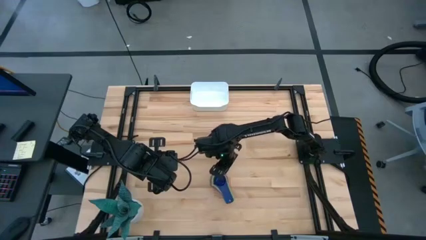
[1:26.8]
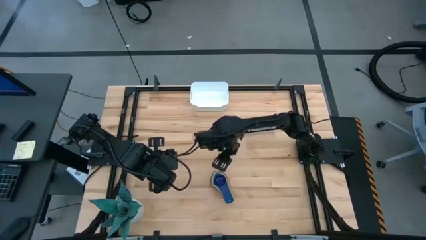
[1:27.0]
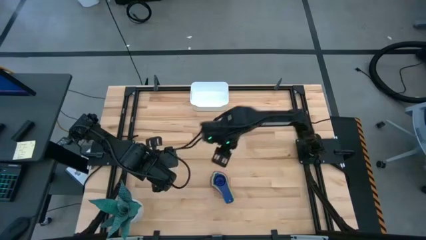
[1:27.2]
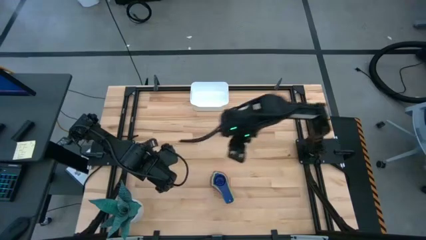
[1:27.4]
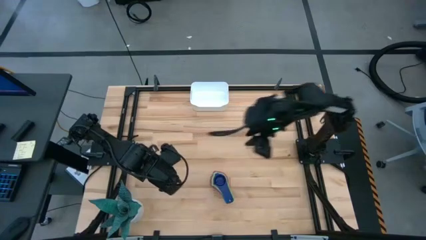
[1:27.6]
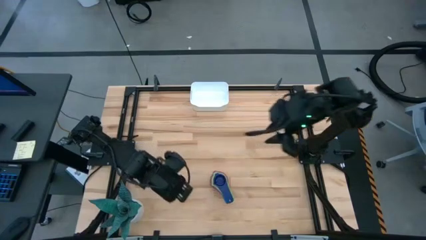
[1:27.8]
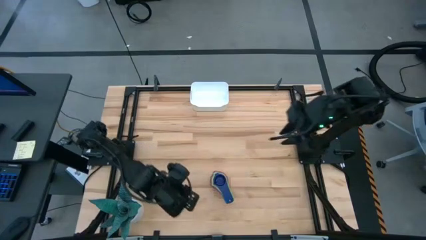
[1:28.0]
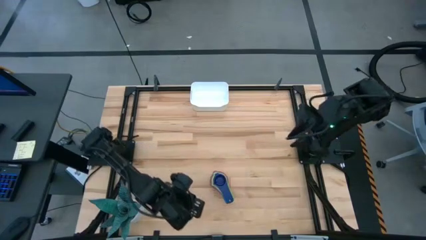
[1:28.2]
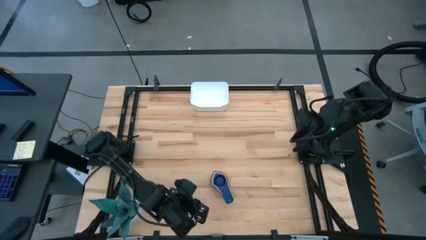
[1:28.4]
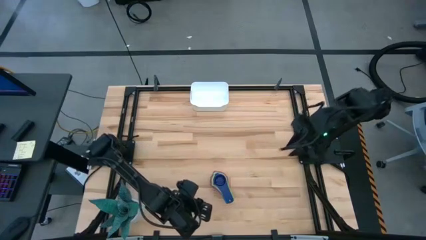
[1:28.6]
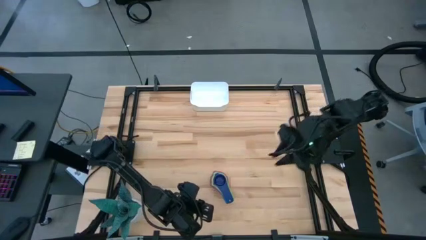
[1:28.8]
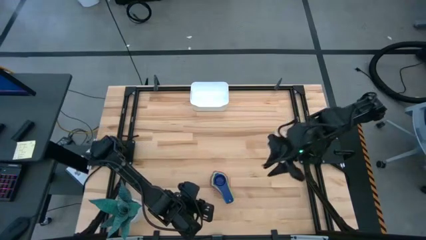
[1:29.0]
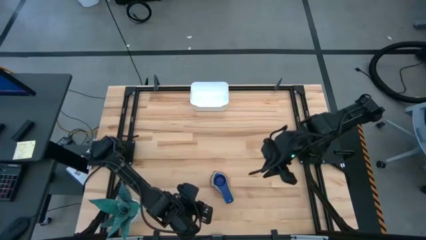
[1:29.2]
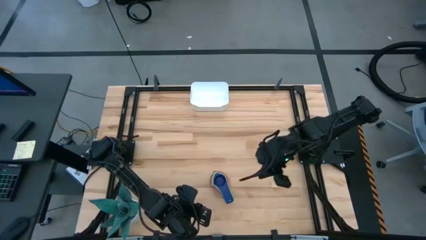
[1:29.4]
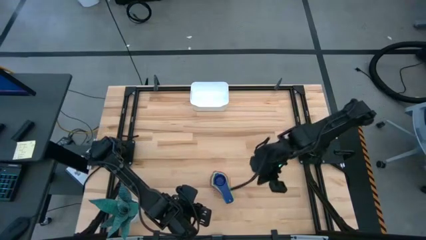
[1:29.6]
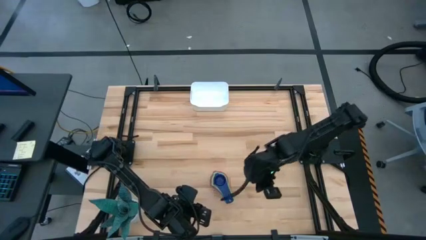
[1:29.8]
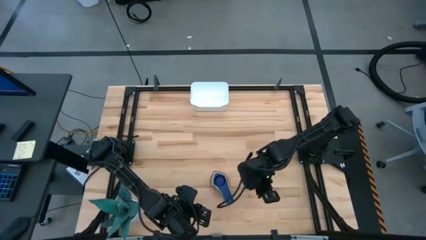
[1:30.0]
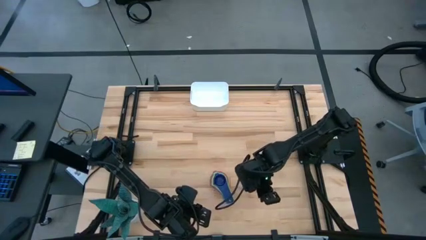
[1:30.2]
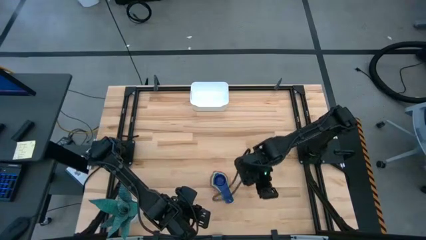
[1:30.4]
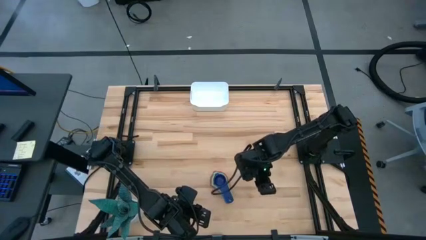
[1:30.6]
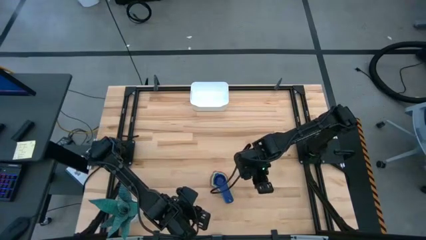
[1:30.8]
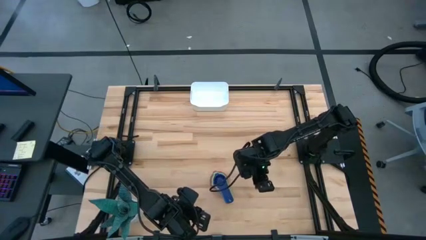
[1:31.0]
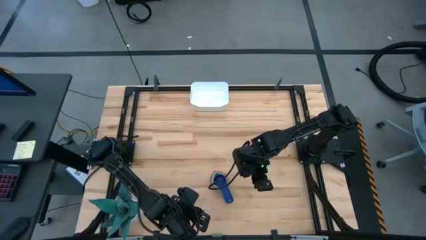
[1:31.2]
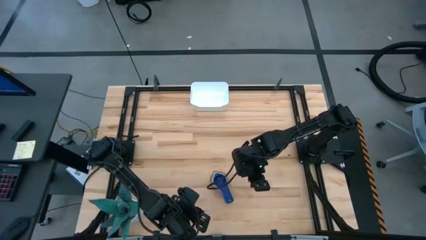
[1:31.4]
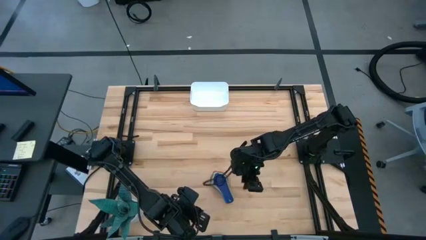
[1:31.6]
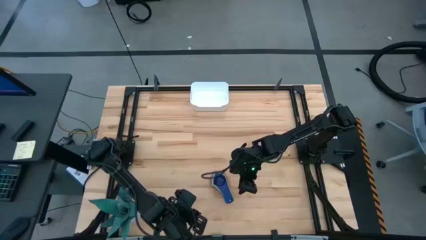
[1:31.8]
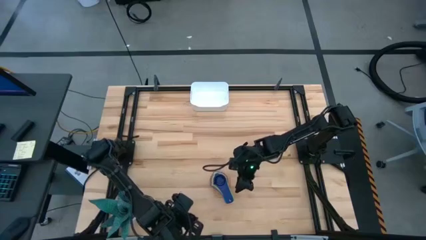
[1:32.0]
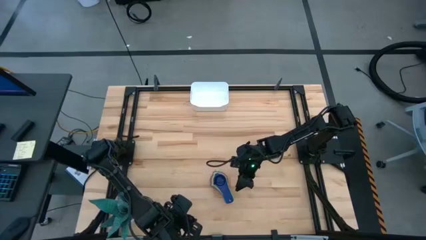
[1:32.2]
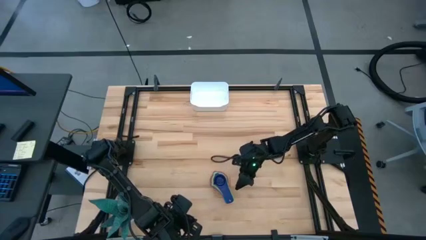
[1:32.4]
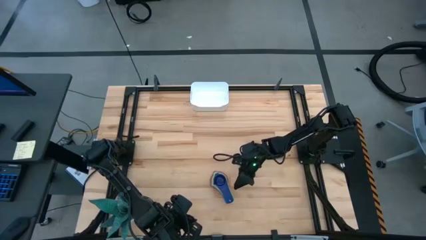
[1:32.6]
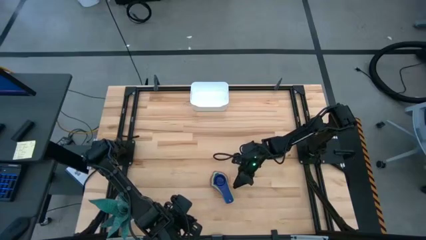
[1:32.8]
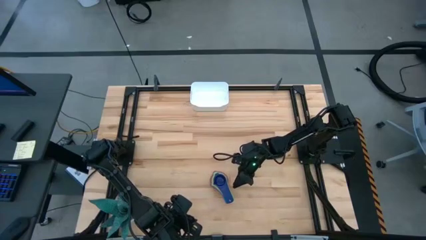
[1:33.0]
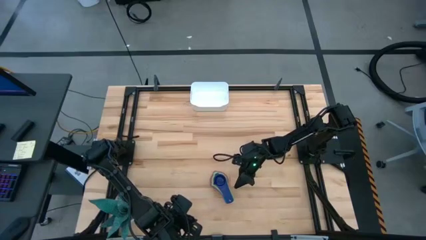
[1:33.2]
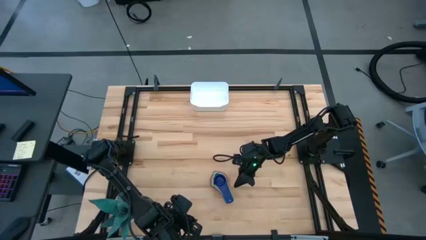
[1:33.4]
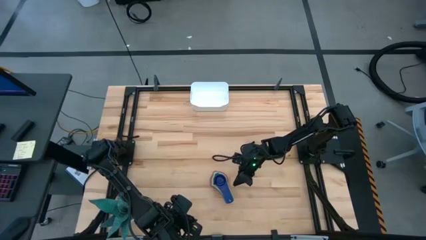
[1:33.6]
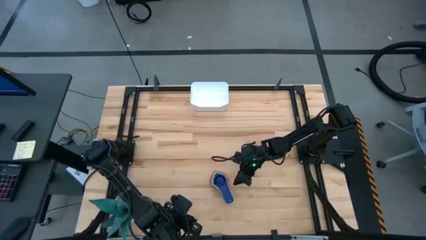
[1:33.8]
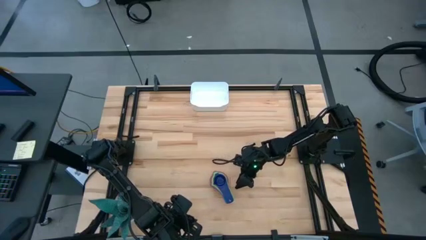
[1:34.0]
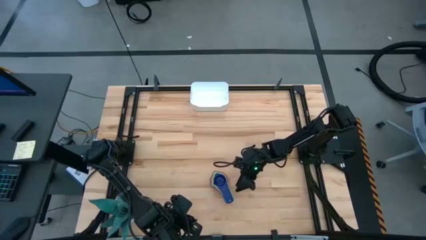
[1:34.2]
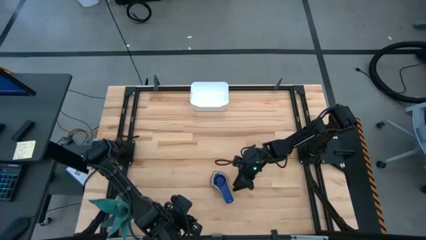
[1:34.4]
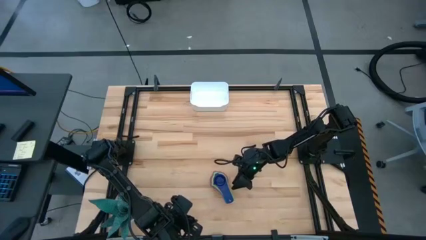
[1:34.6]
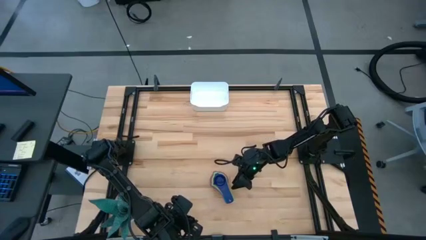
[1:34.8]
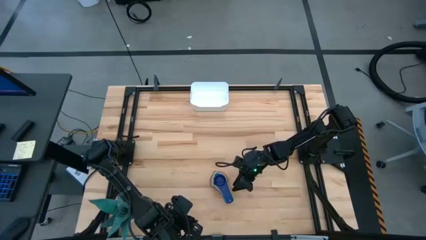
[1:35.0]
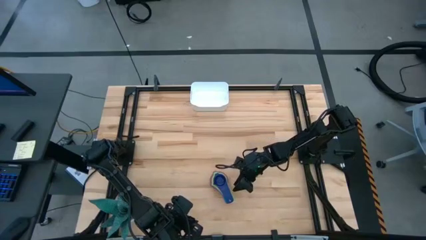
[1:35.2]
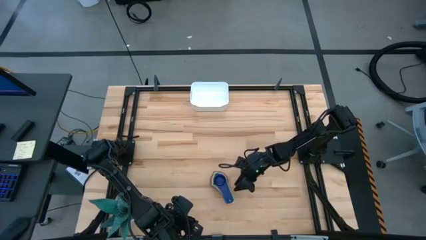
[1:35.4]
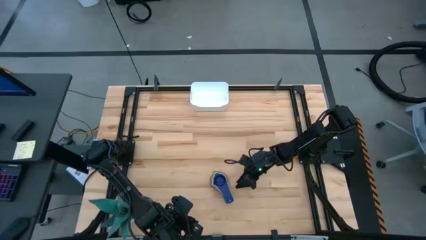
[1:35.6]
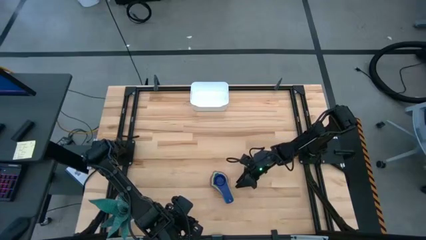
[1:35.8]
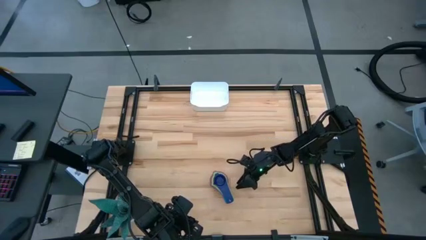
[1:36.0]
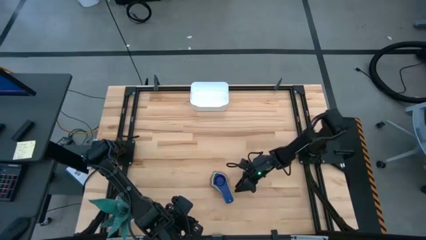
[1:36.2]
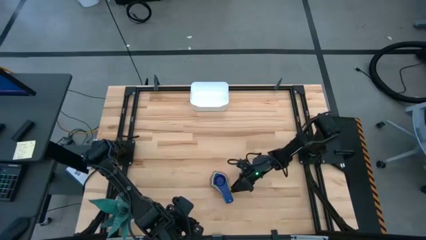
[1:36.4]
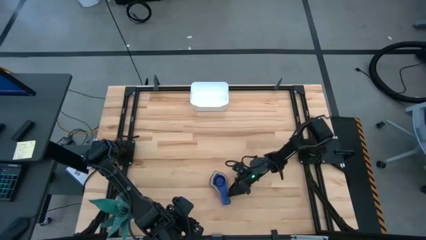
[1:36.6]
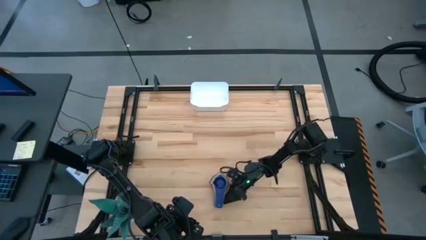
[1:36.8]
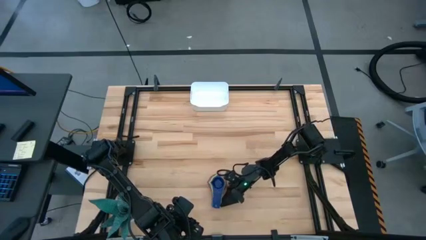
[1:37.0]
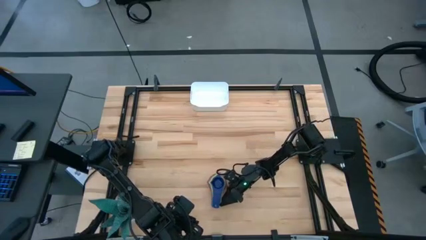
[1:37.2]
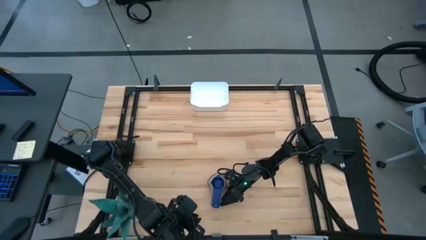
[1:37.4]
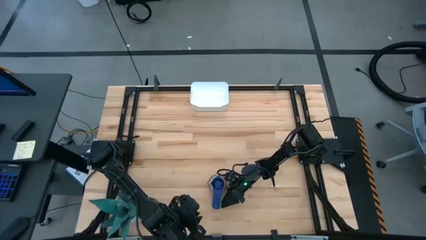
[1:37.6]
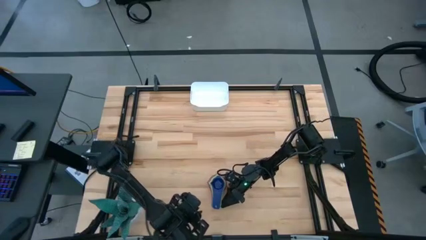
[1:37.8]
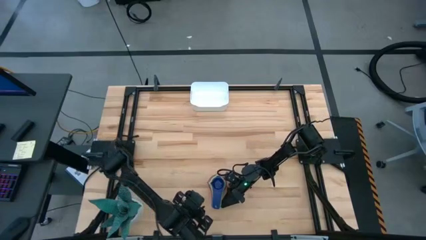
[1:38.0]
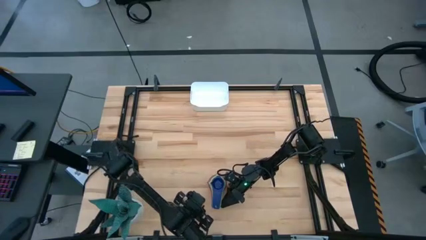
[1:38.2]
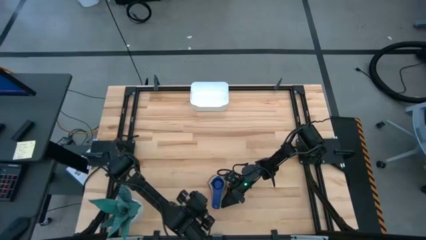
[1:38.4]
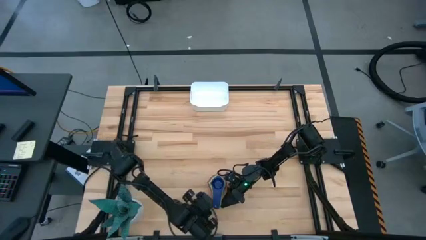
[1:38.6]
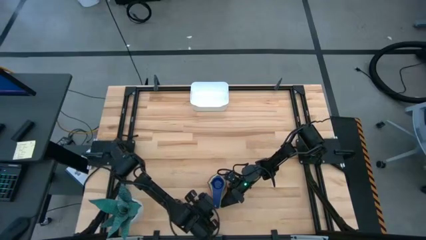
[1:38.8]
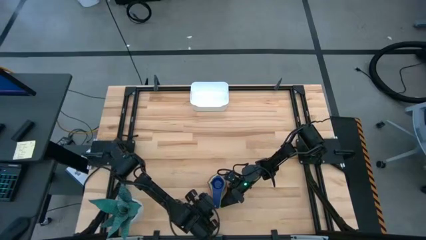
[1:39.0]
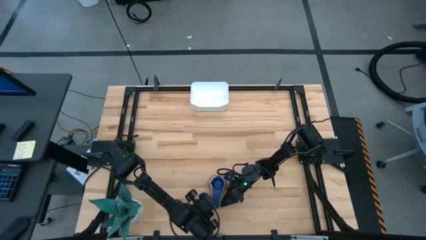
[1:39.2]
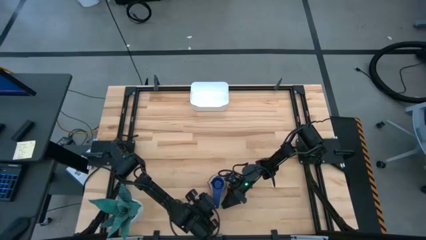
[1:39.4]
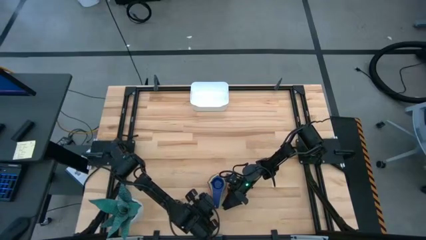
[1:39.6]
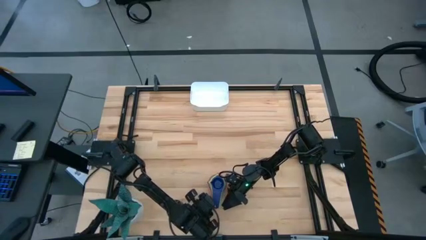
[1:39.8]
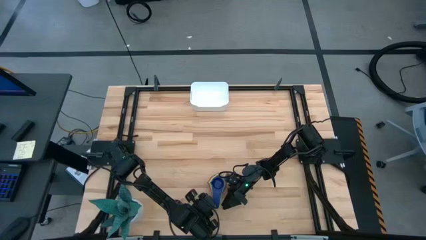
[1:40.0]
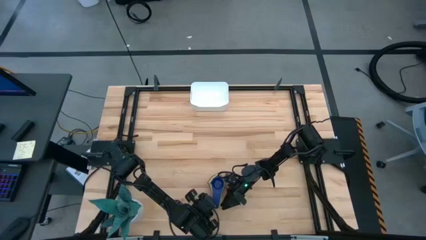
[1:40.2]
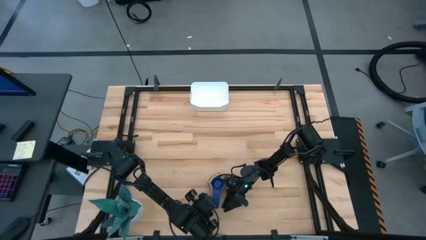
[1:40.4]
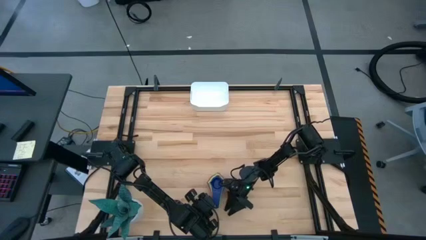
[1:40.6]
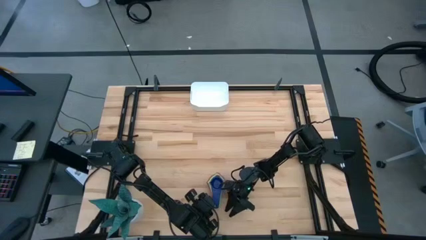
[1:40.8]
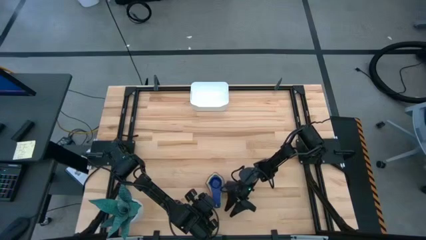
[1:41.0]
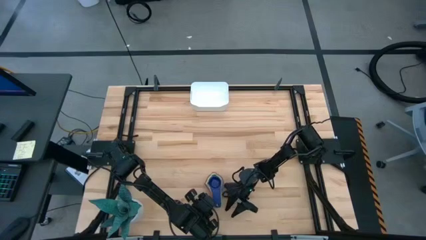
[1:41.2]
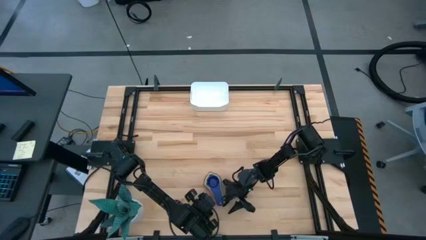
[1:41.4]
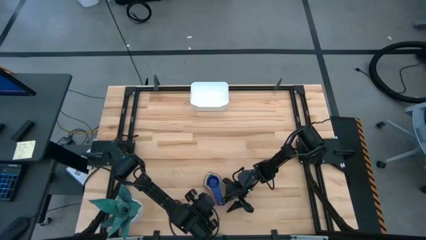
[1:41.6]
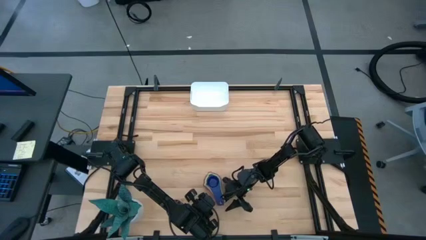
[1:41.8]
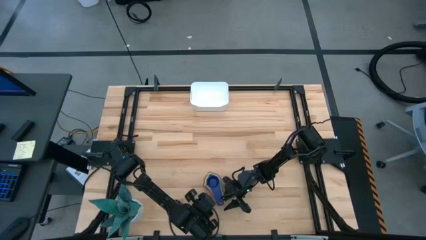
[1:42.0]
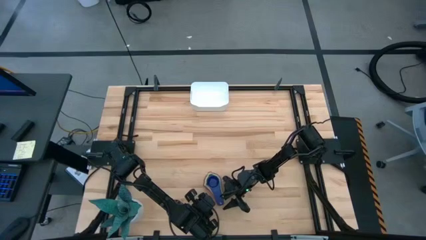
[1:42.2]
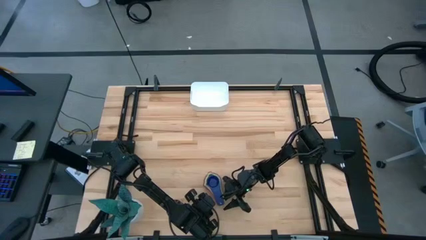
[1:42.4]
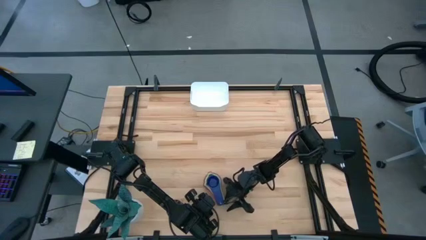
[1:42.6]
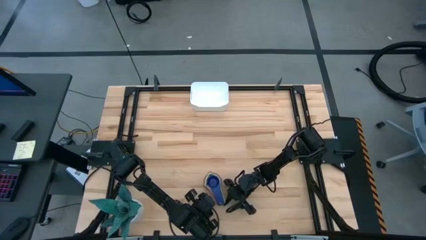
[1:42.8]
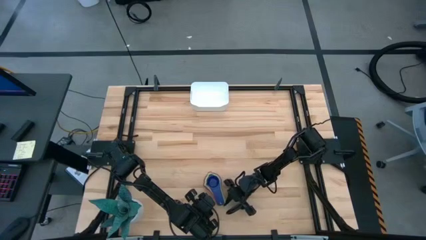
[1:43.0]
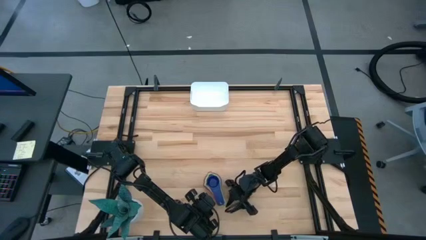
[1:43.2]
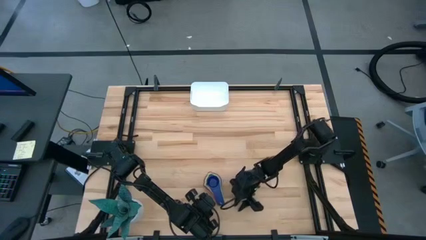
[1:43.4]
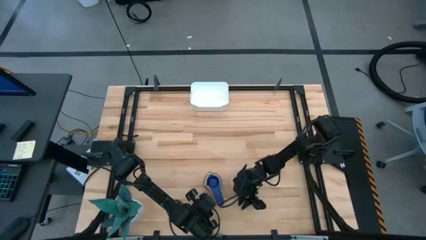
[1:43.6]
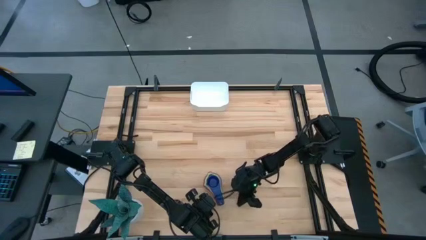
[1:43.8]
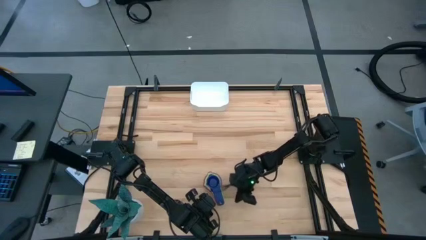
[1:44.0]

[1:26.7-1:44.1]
Task: Nest measuring cups in basket
Put the stacked measuring cups into the white bin
